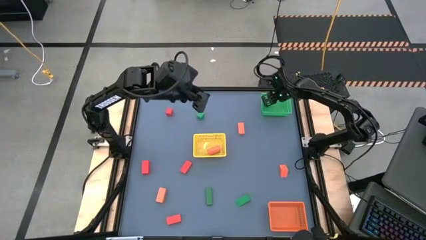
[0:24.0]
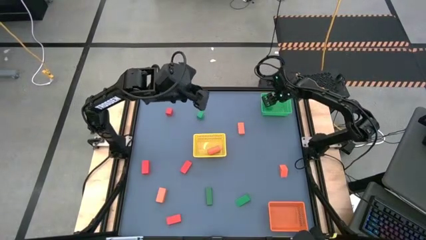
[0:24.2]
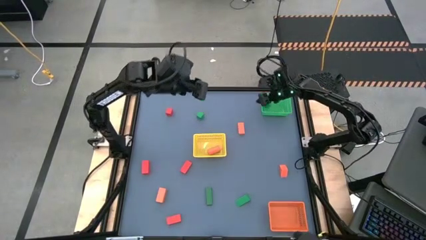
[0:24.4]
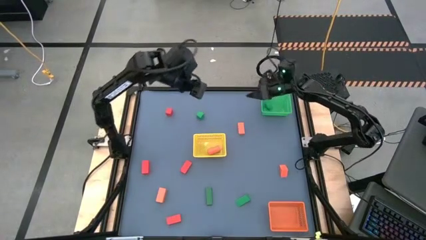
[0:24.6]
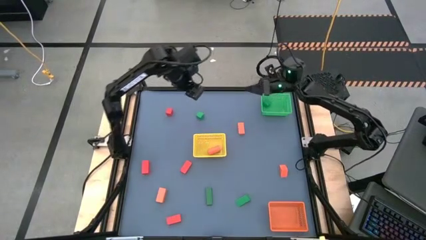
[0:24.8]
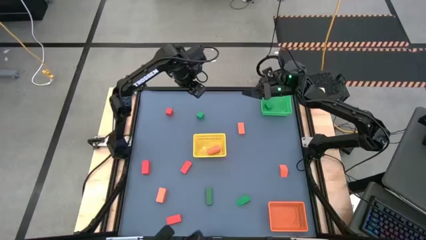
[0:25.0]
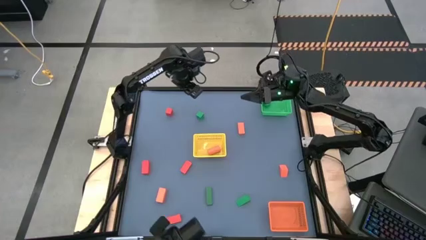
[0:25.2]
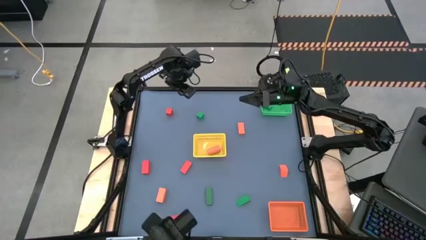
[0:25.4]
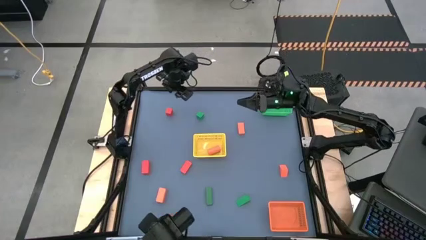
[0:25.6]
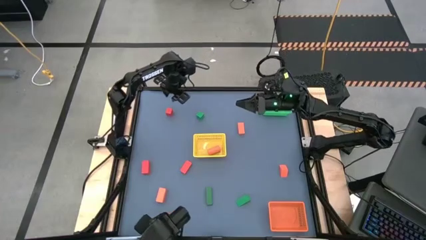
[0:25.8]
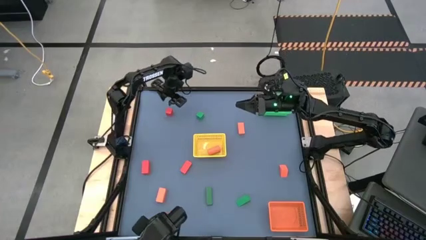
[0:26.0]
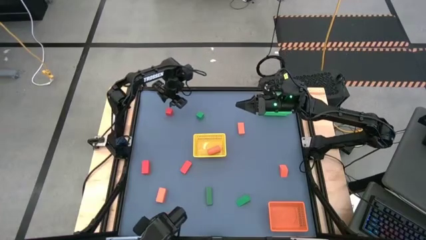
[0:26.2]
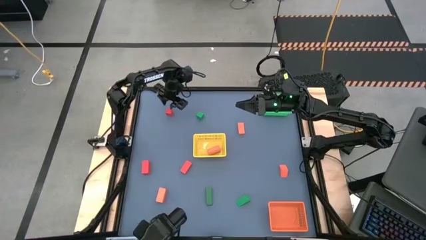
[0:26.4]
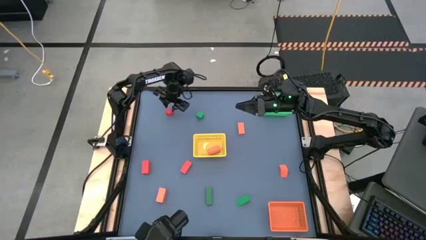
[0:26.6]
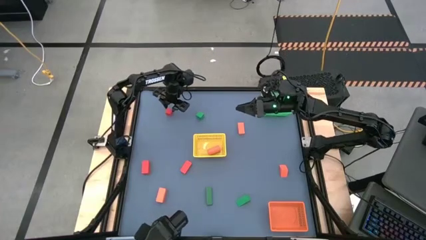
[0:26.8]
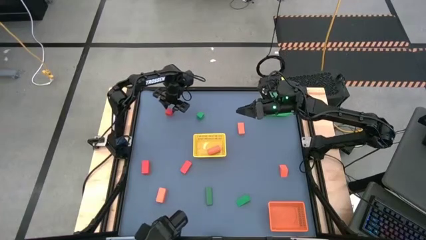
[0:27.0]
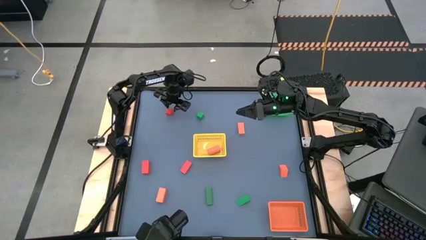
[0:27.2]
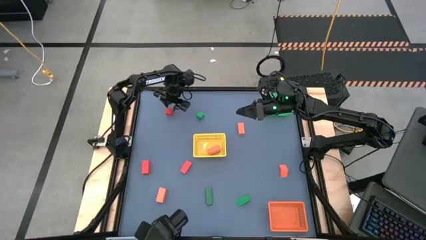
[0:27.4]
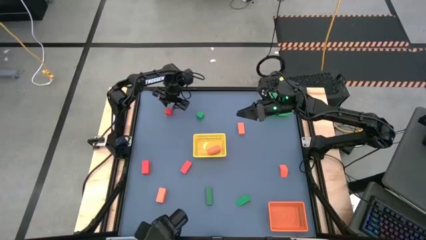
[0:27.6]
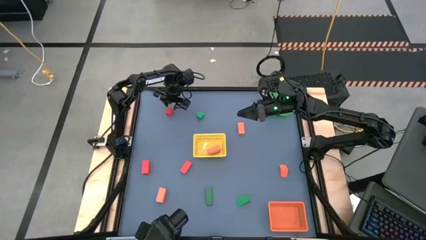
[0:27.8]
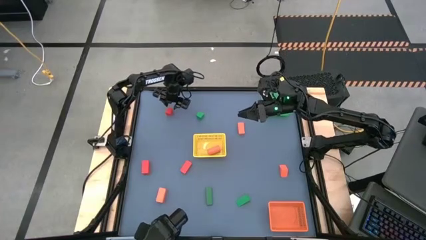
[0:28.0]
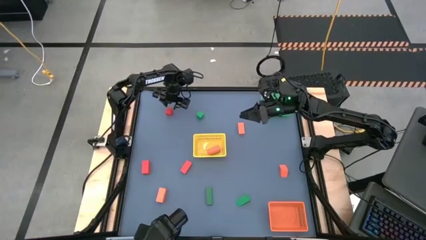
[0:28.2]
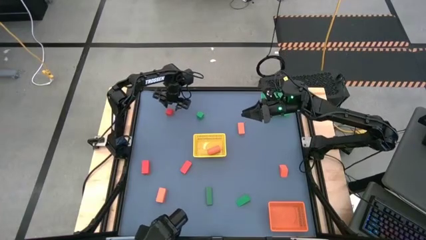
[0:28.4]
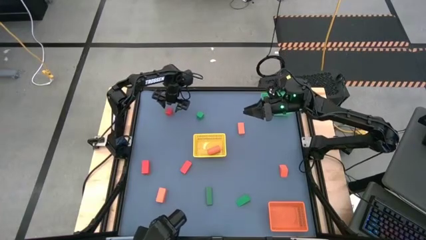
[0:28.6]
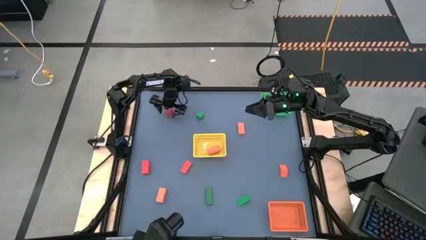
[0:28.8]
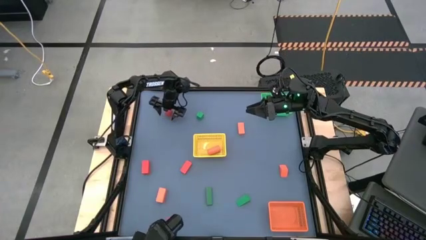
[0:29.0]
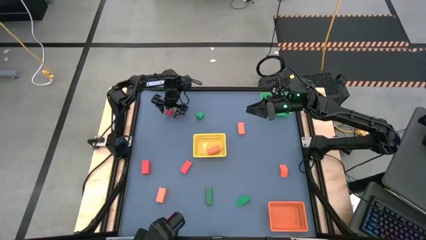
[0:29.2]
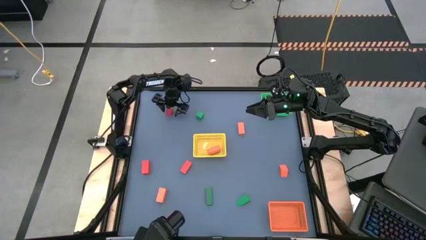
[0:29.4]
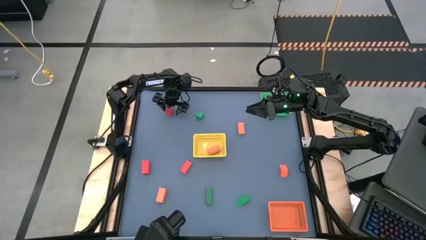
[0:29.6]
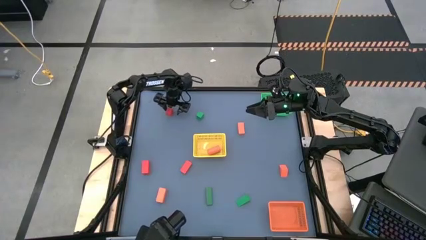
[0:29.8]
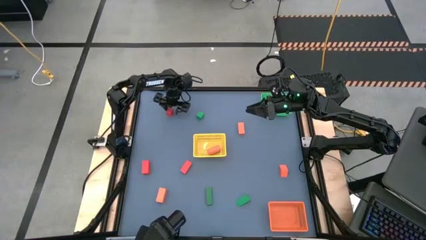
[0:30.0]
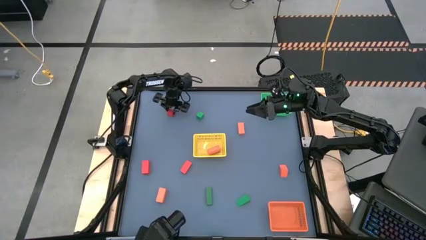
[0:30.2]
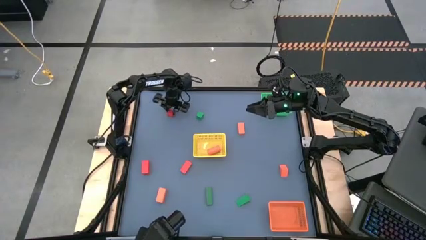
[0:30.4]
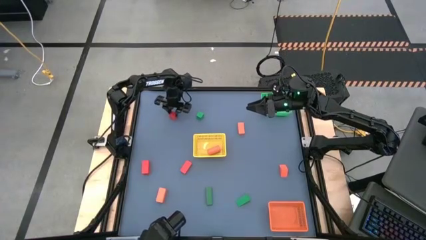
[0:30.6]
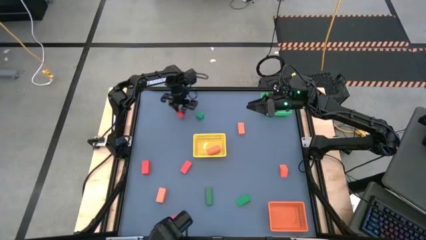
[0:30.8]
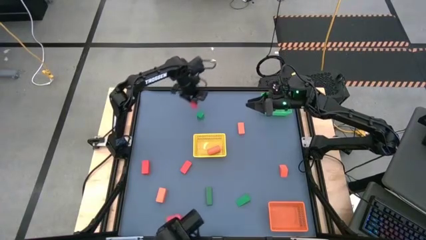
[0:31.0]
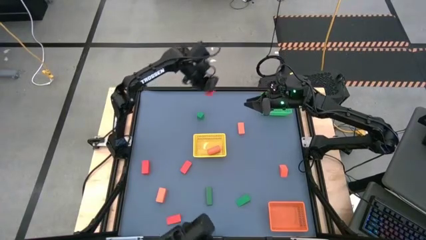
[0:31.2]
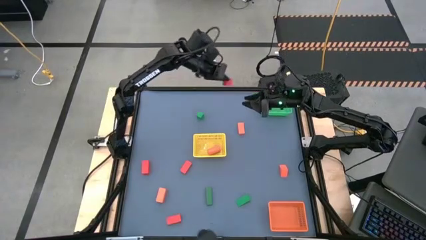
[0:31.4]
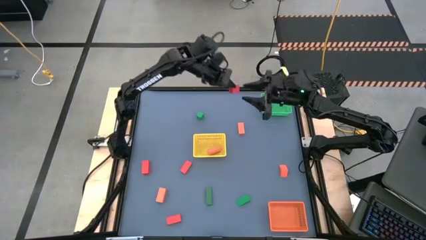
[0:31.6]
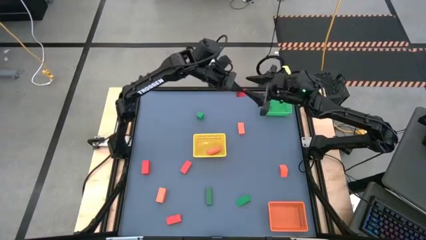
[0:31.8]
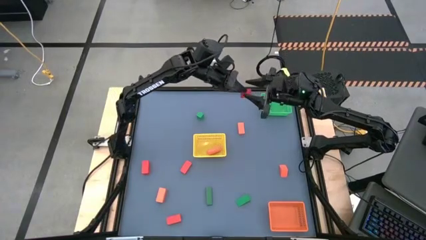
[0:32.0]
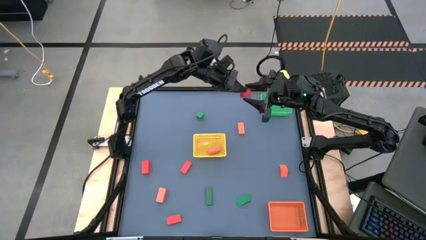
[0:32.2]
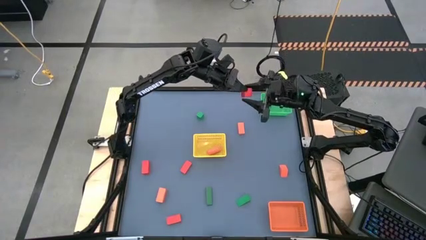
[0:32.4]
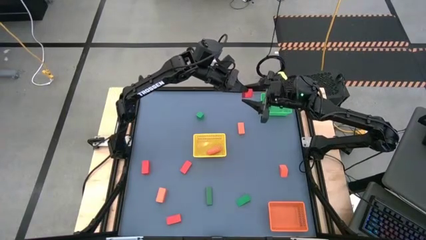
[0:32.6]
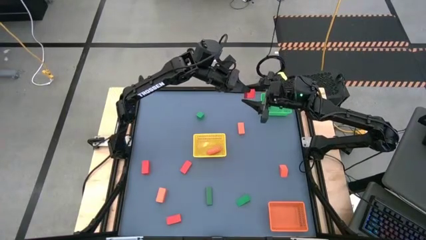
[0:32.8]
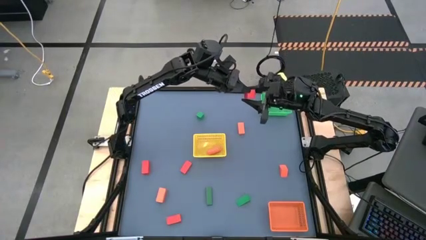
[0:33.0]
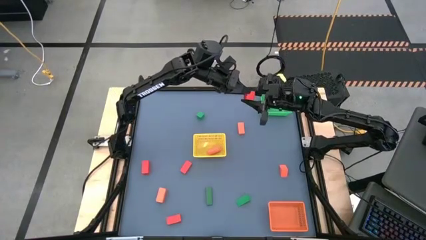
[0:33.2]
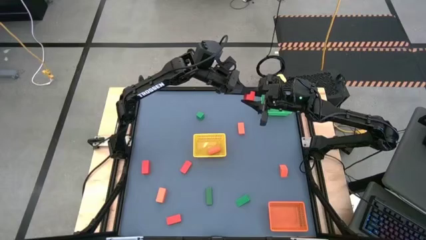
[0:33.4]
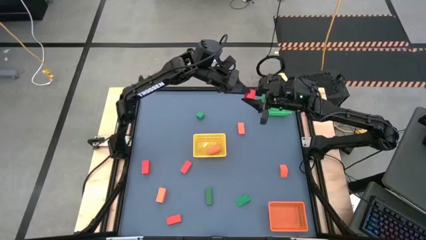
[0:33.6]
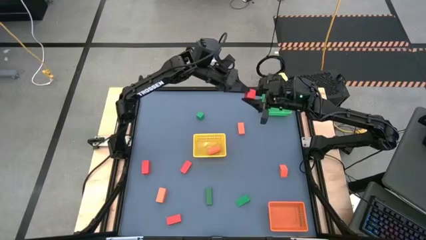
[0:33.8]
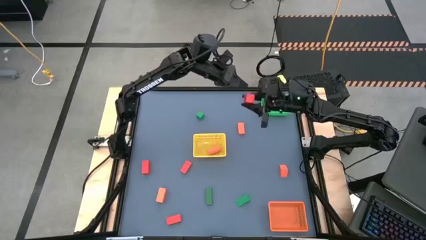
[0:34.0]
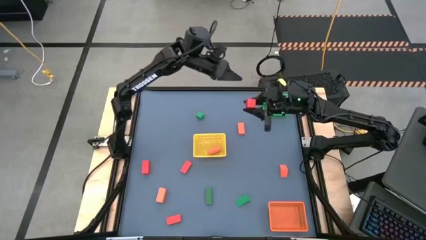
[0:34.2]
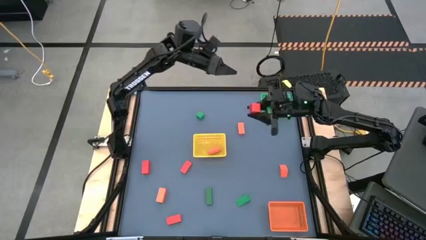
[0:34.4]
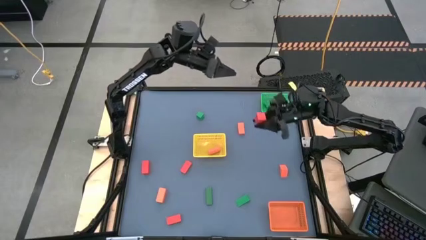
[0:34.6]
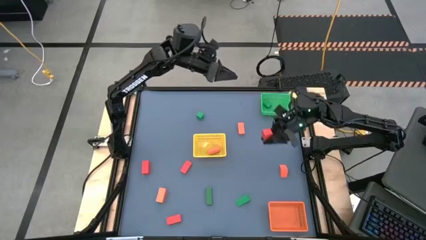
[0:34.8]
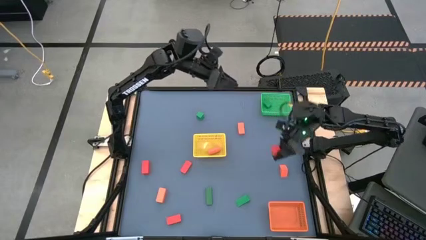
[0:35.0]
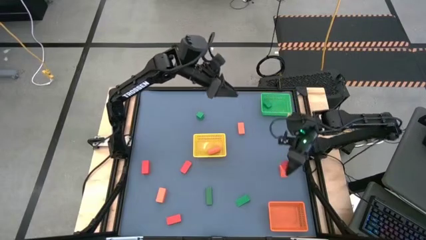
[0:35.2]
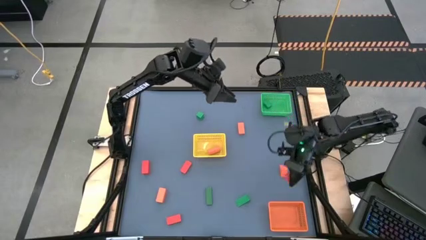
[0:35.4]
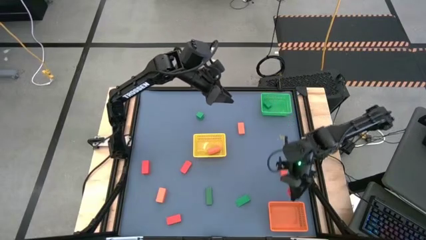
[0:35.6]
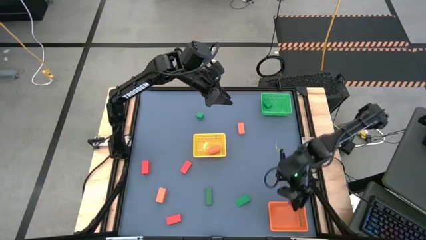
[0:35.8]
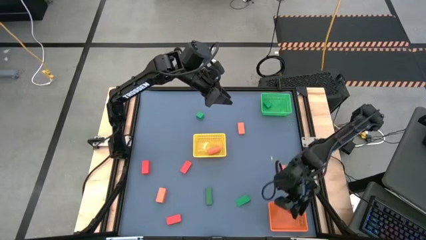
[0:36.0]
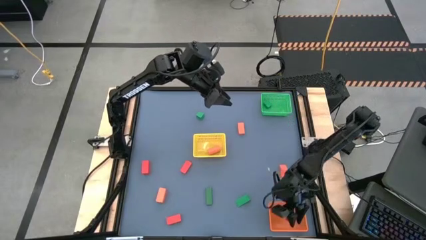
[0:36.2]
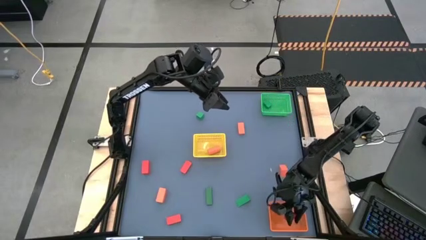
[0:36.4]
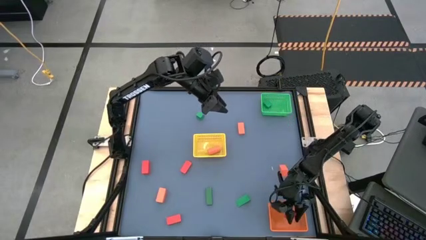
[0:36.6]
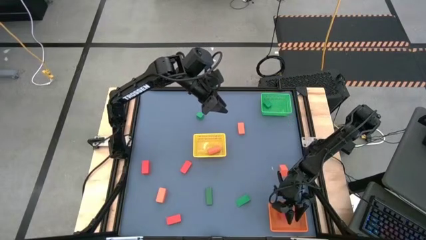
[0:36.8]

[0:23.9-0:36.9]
Task: Sort & place blocks by color
Put the red block into the orange basket

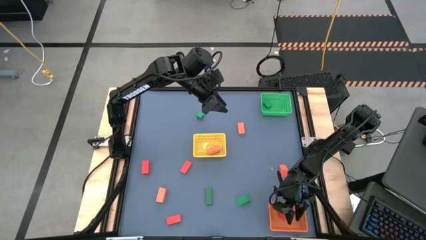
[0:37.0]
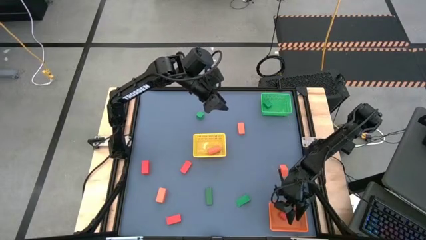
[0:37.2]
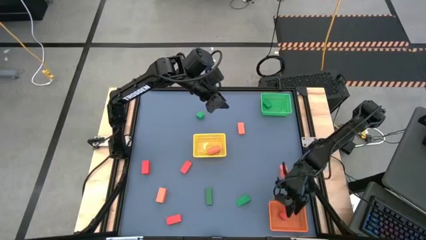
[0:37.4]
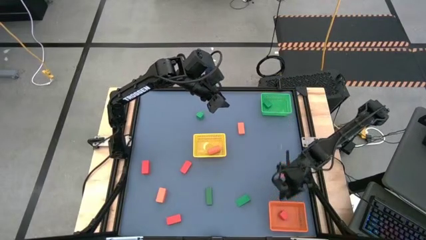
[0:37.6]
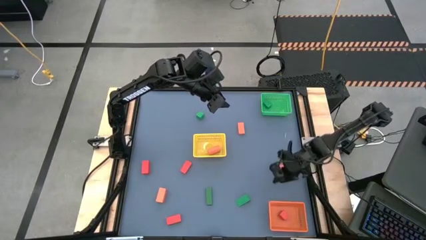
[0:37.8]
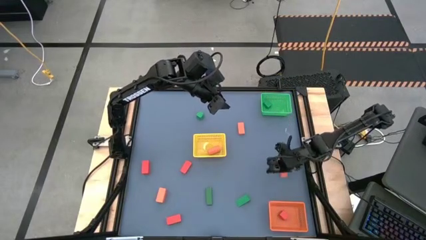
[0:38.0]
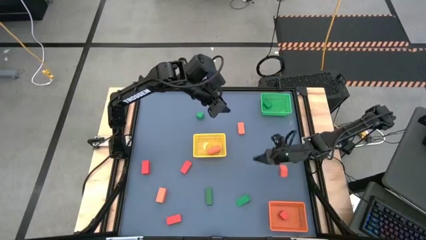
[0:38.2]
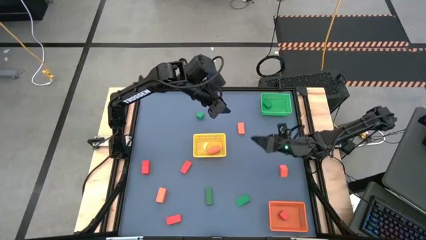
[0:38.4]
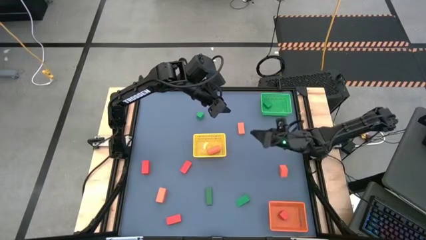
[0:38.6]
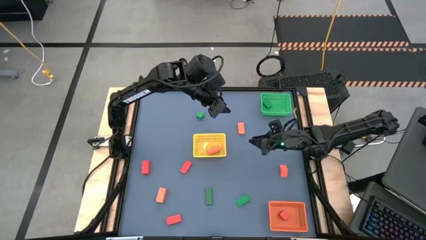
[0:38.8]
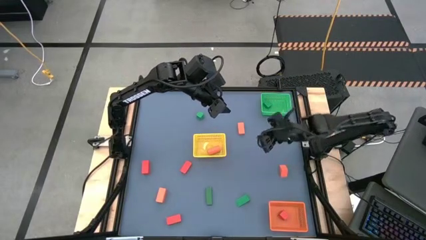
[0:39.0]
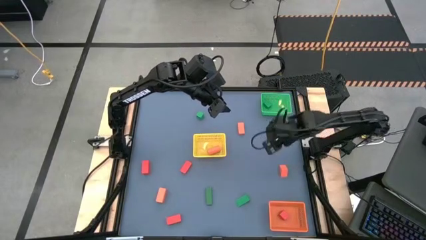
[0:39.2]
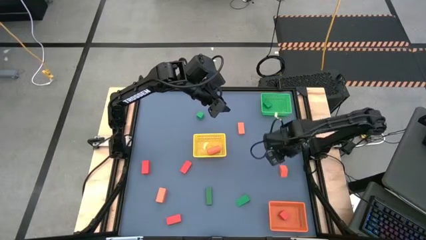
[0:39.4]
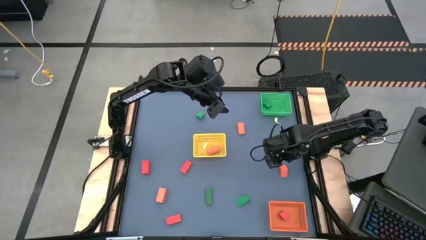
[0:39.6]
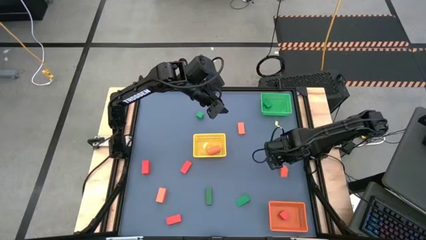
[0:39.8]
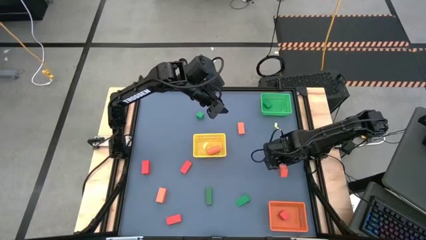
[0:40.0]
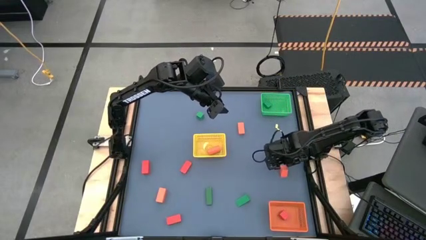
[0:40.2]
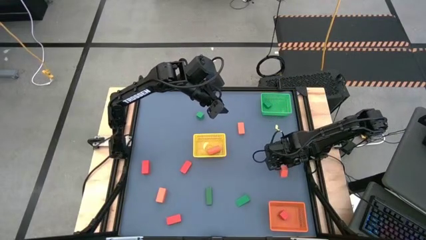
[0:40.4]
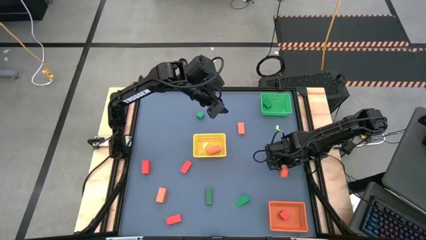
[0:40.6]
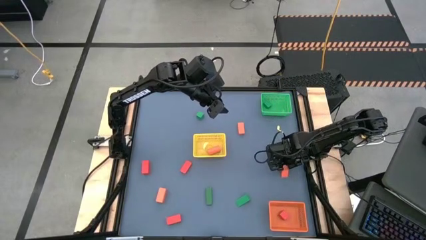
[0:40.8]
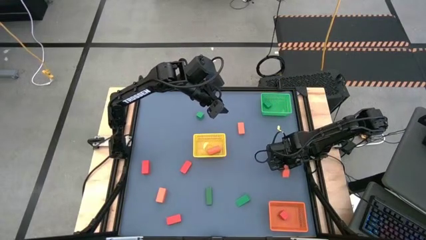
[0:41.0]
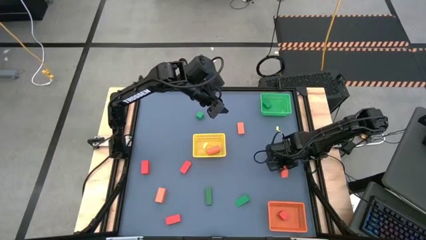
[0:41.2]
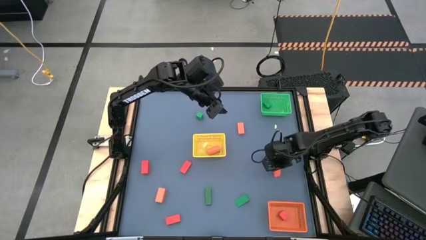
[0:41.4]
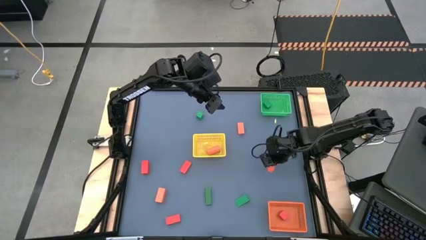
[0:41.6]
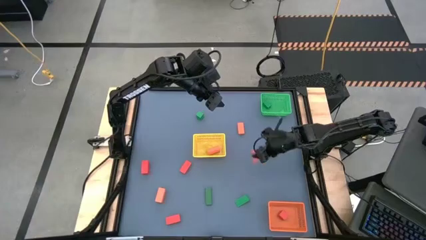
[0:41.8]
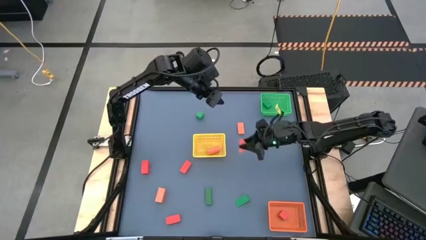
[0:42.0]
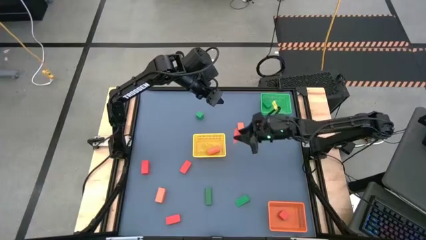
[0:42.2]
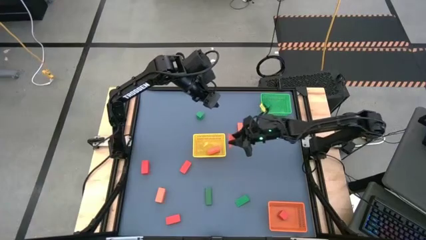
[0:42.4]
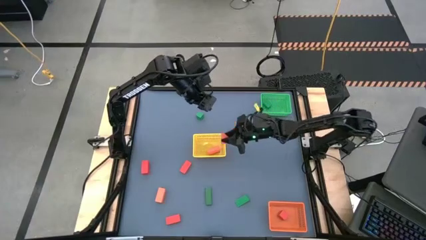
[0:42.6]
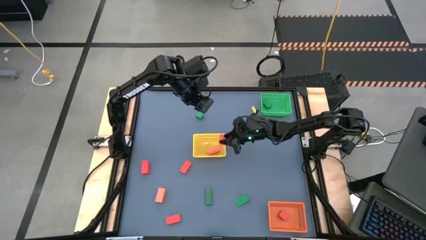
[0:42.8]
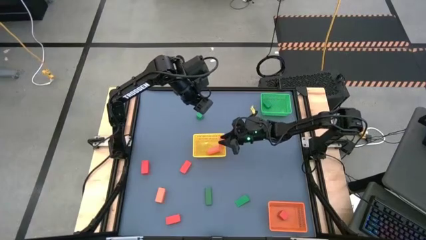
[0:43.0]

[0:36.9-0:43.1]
Put the orange block into the yellow basket
